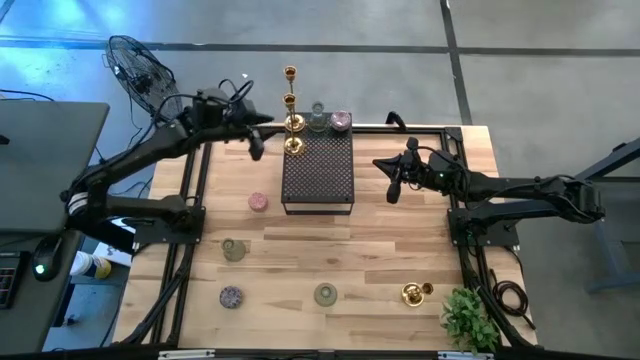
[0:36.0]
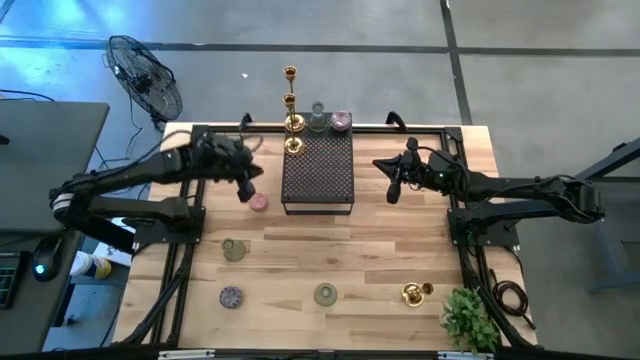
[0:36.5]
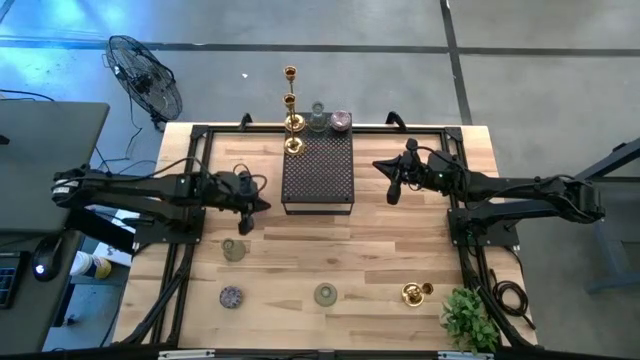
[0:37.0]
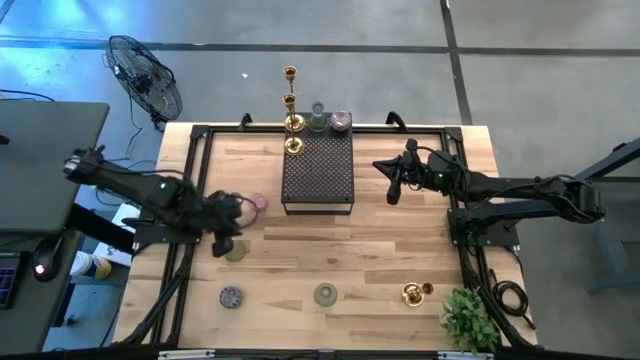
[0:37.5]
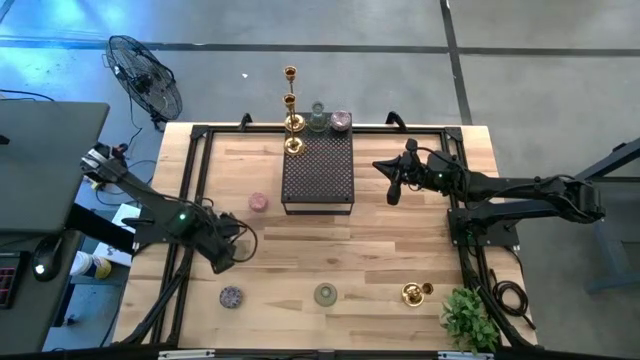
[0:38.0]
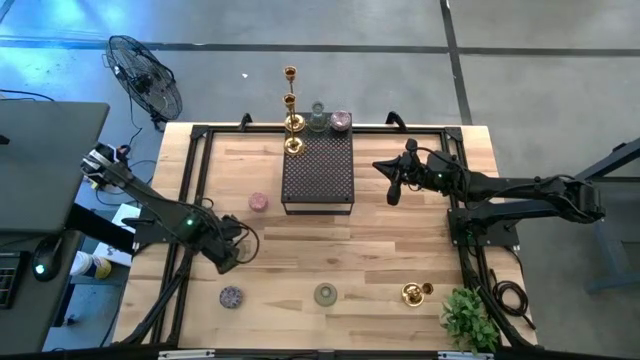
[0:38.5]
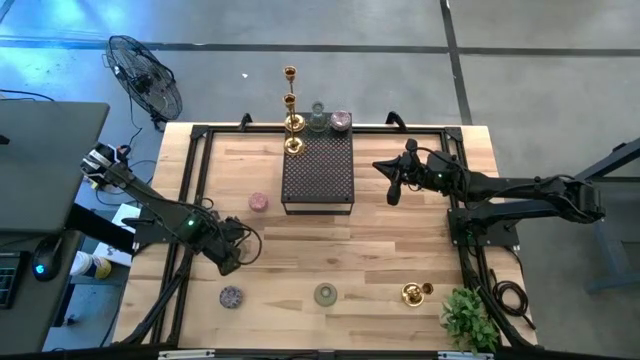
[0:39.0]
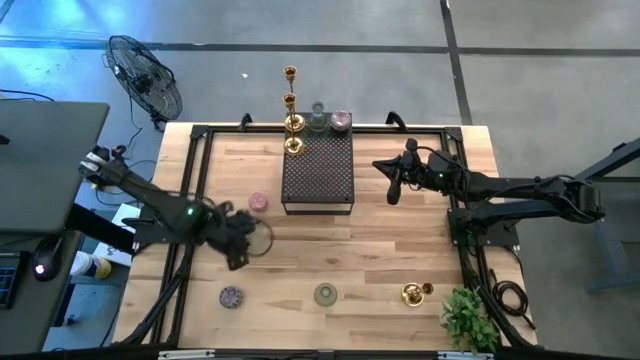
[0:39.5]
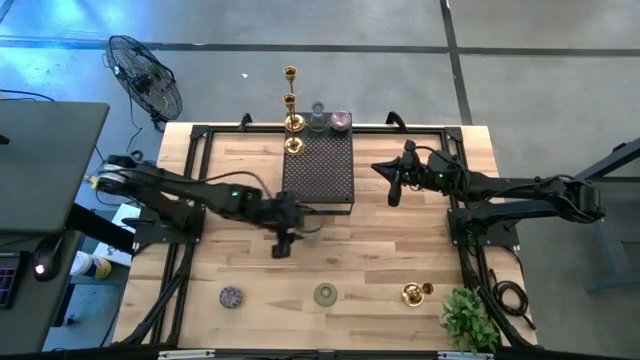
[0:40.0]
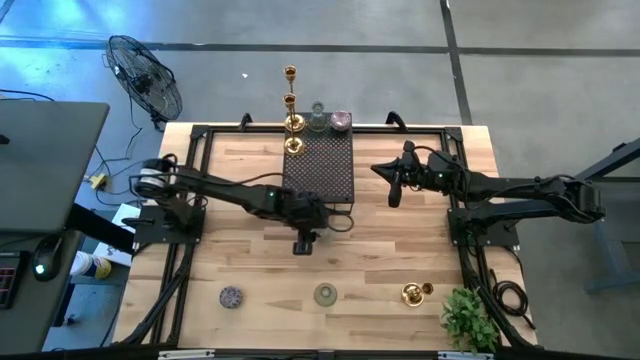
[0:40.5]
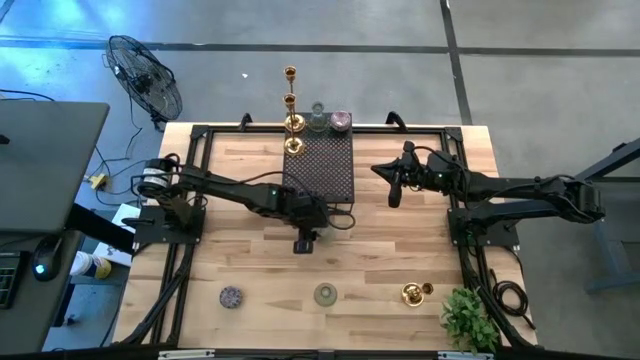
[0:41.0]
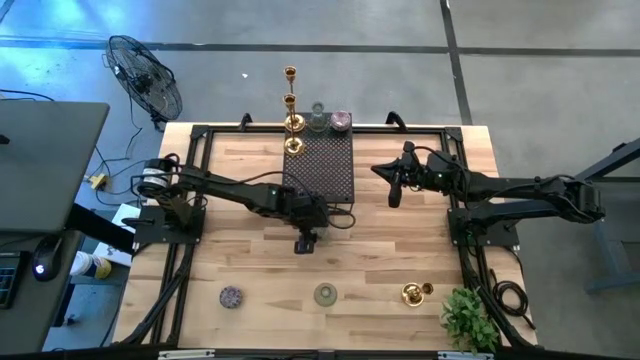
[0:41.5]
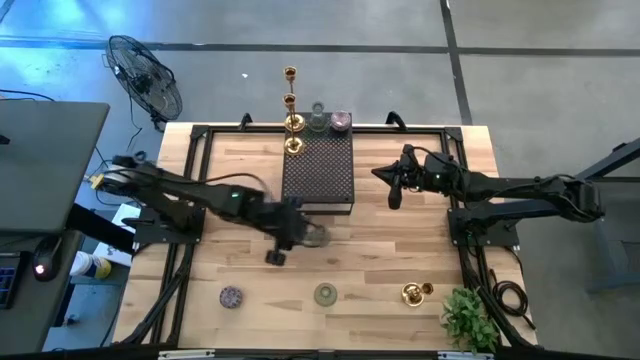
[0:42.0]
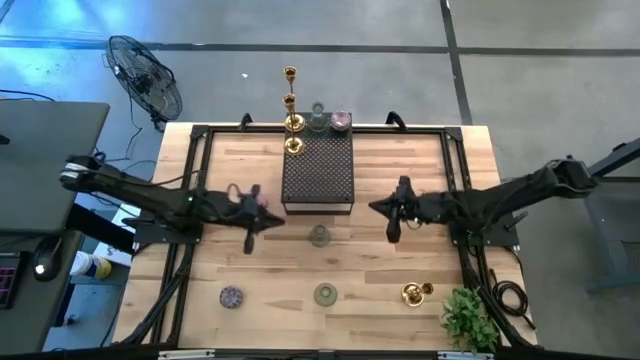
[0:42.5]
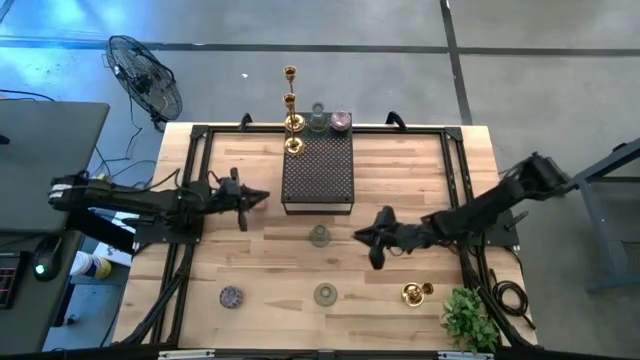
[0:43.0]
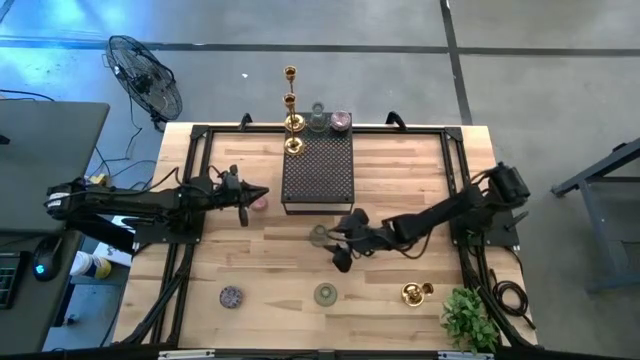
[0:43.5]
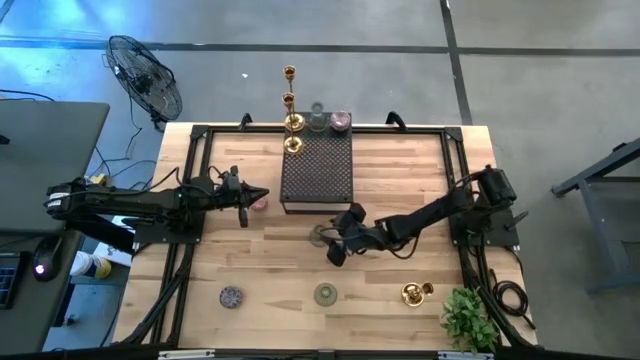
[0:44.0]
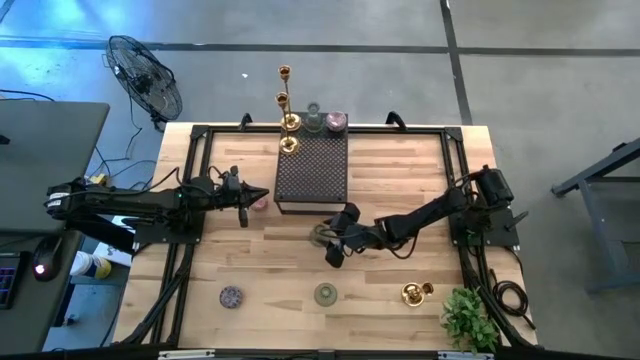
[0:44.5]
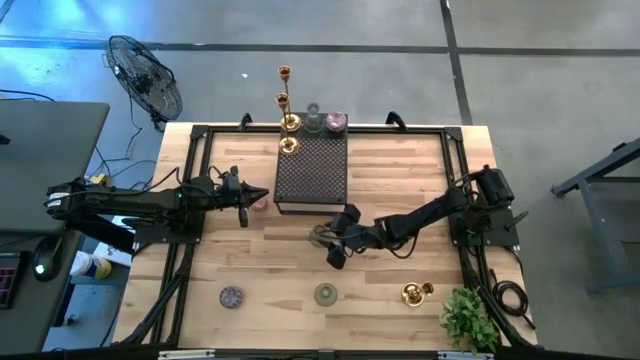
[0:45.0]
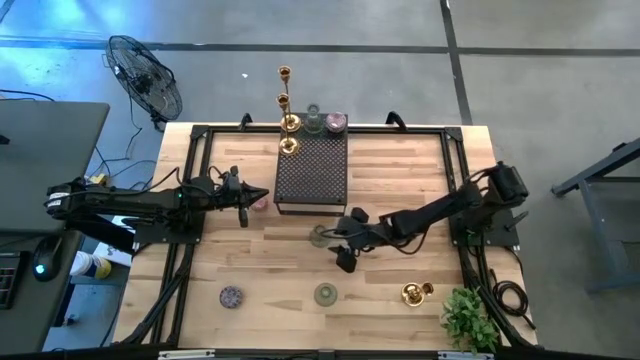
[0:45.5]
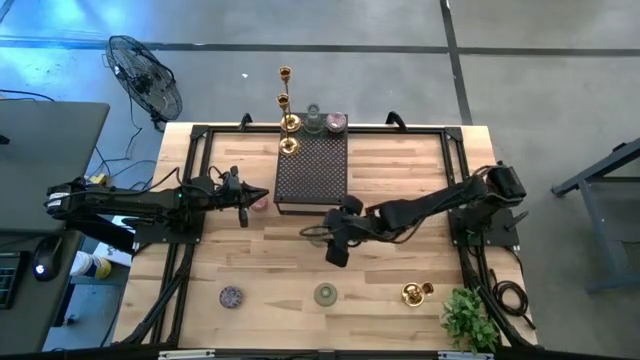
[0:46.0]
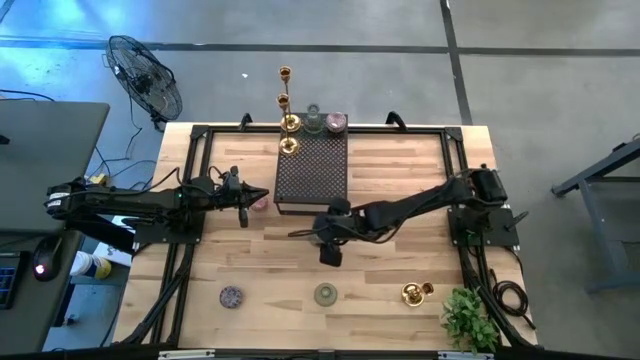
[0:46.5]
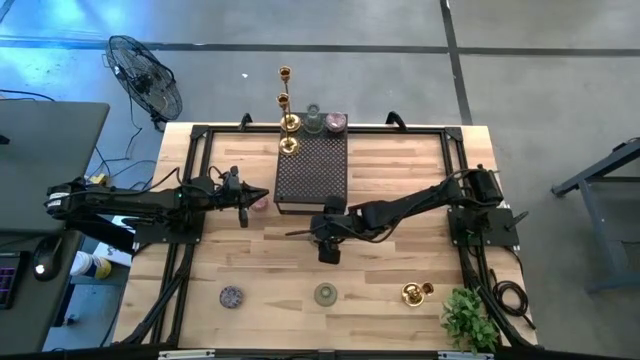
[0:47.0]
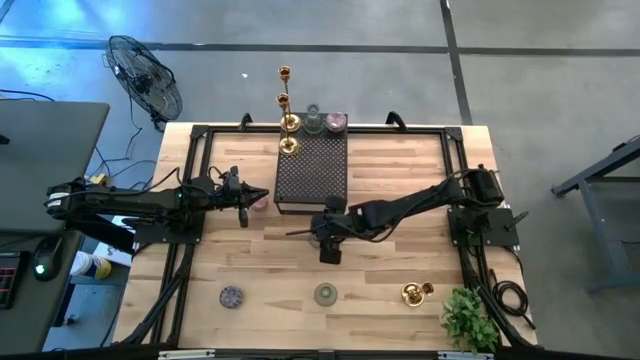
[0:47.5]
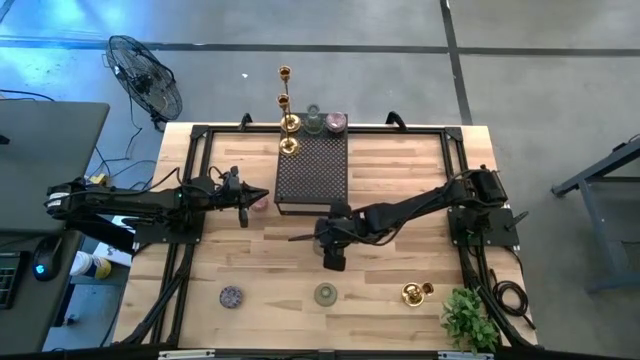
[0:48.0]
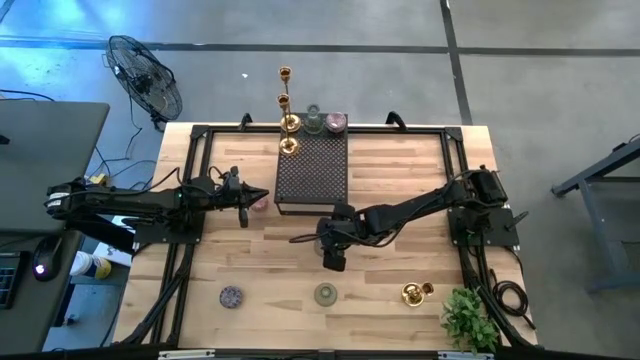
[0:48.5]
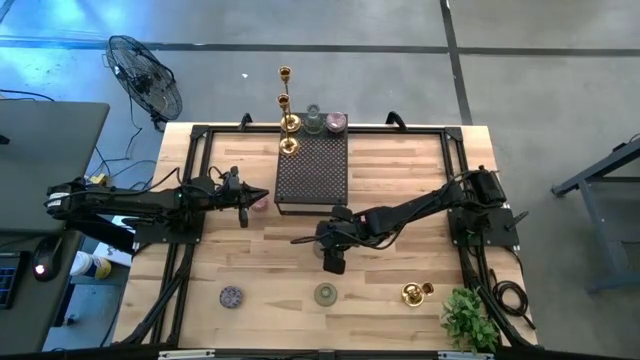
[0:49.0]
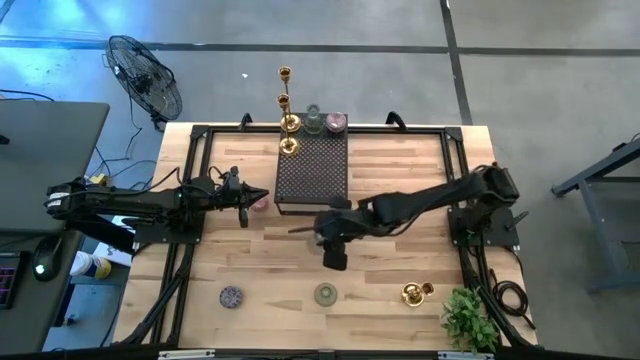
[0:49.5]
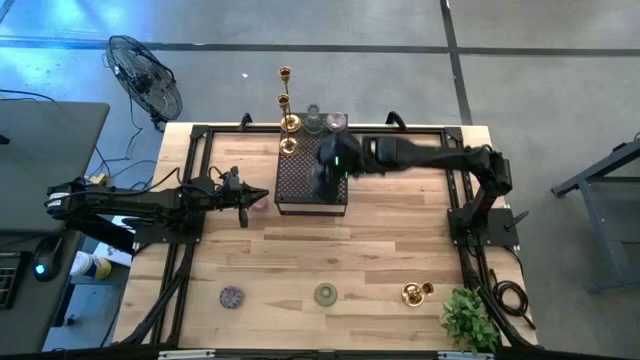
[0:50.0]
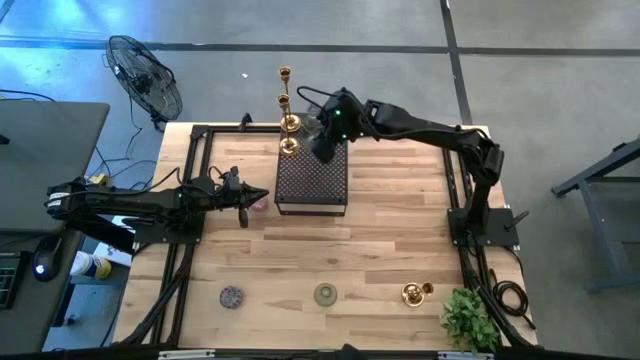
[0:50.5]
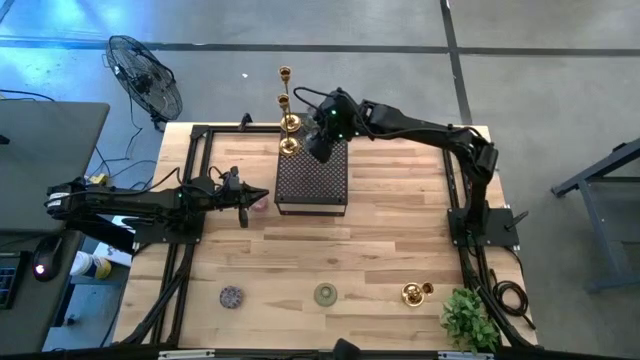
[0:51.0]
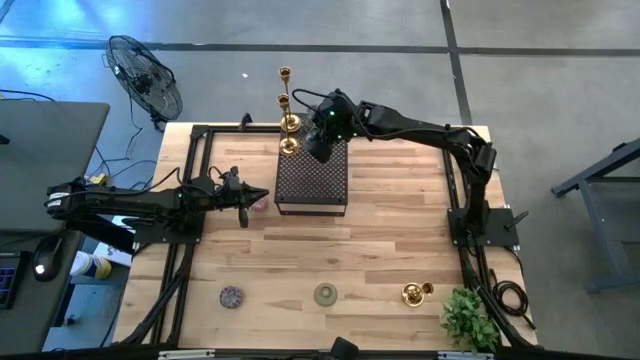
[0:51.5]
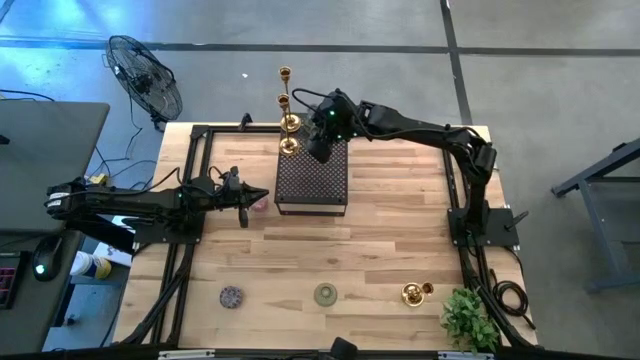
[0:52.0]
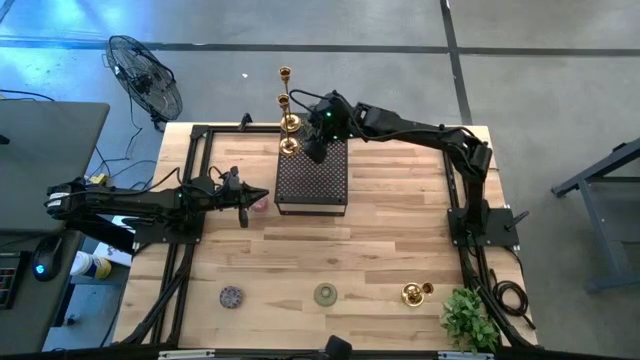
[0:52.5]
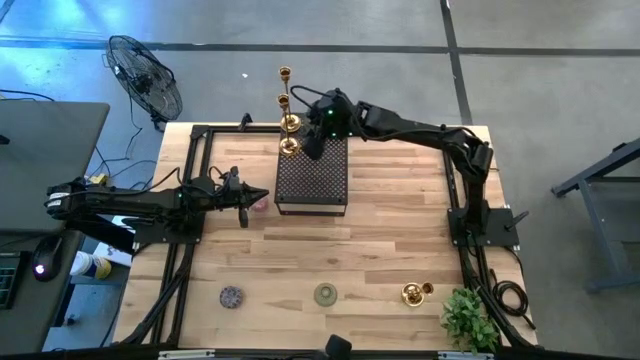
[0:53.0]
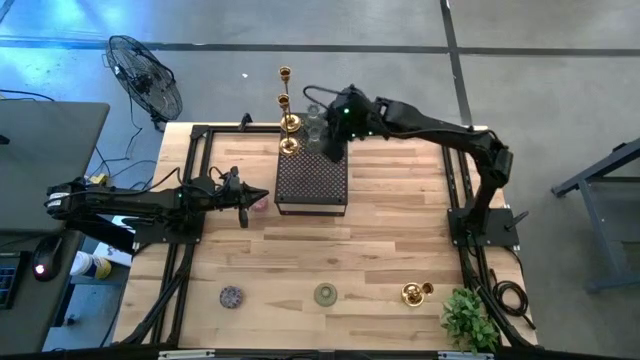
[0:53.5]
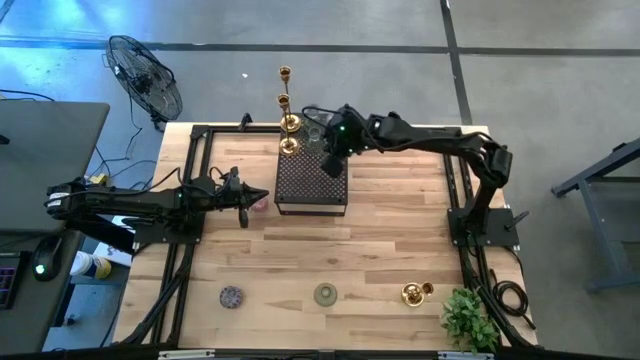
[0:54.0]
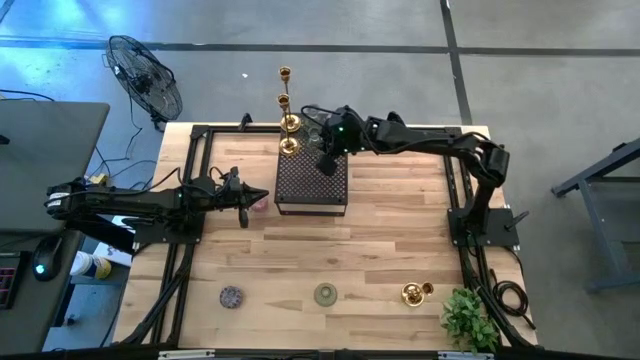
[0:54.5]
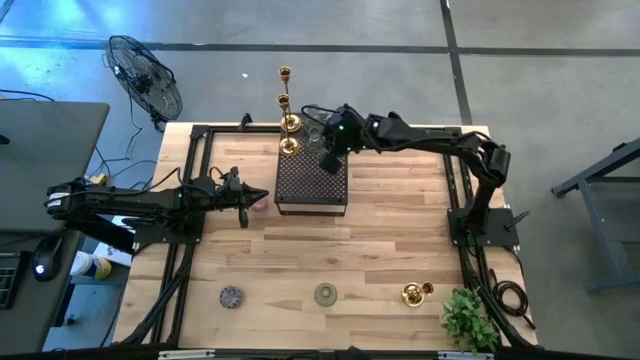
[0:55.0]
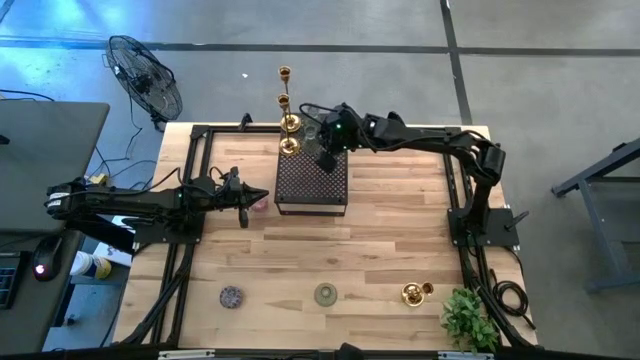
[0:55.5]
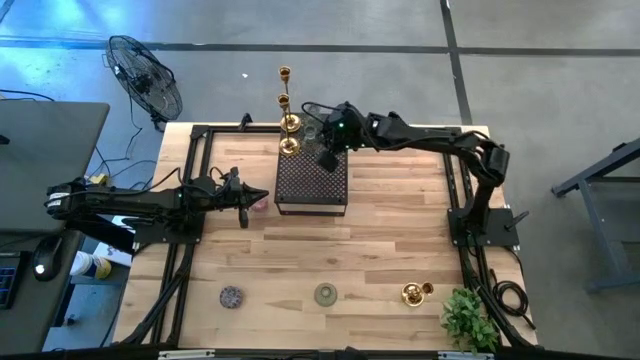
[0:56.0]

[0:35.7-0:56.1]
Task: Pick & Place candle stick holders
Put the green candle holder on the shelf
